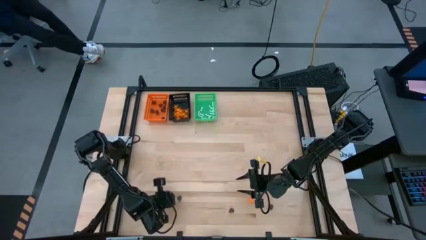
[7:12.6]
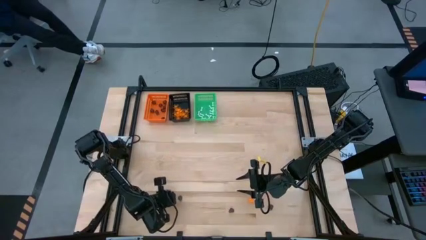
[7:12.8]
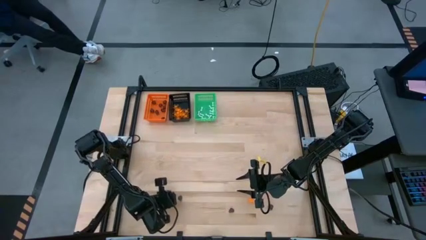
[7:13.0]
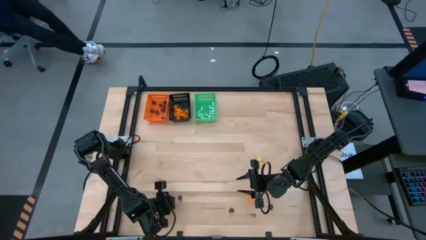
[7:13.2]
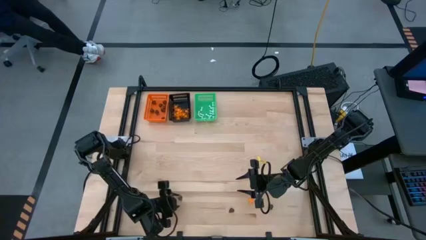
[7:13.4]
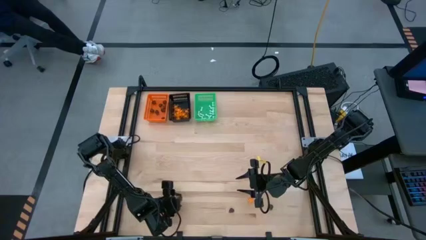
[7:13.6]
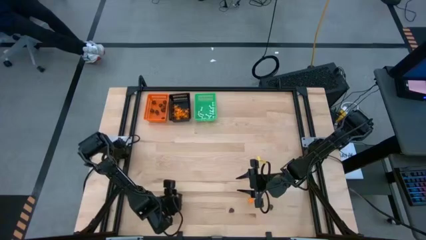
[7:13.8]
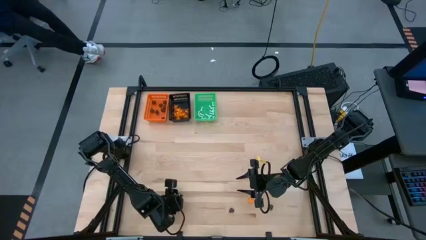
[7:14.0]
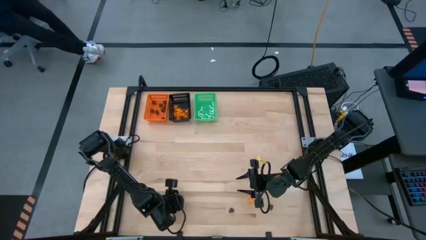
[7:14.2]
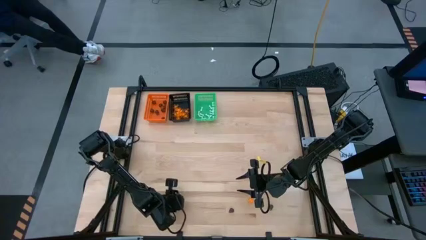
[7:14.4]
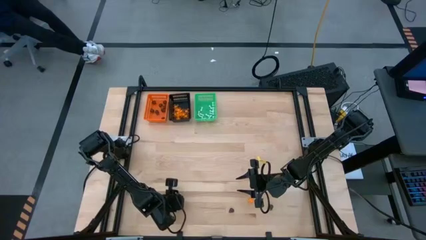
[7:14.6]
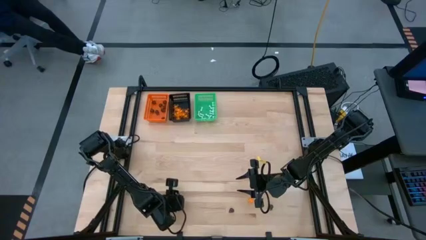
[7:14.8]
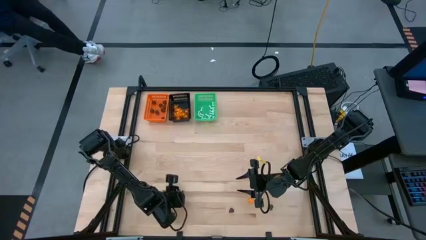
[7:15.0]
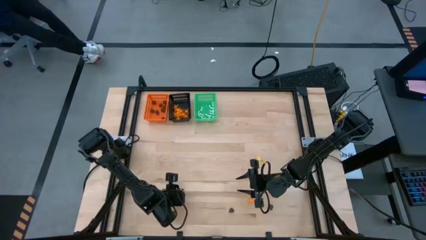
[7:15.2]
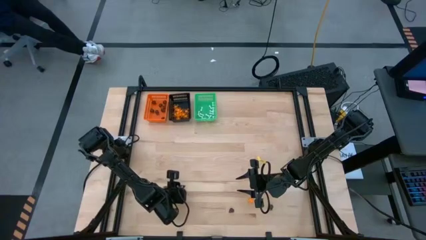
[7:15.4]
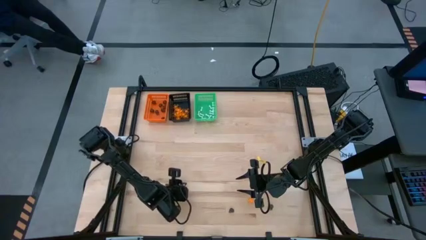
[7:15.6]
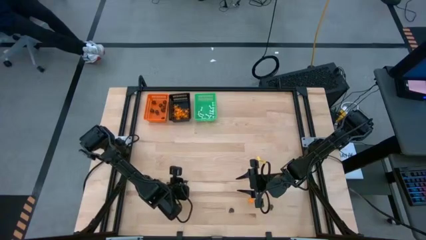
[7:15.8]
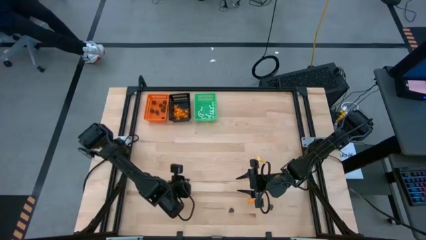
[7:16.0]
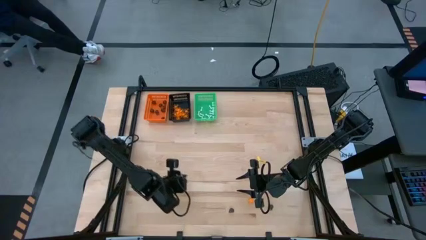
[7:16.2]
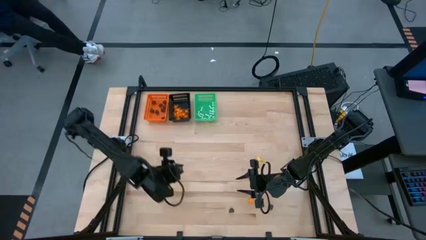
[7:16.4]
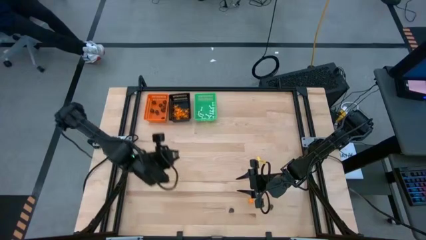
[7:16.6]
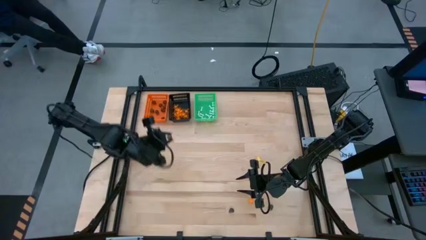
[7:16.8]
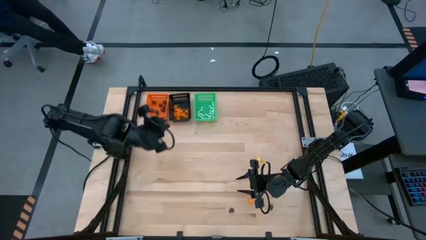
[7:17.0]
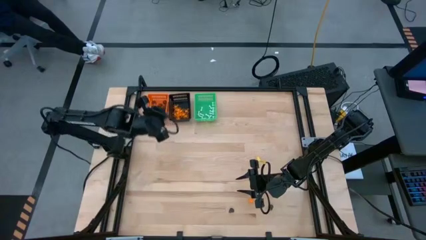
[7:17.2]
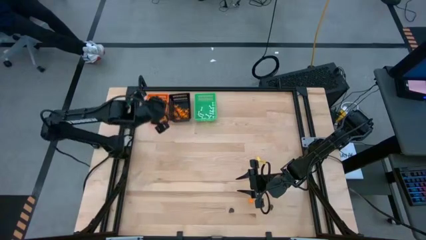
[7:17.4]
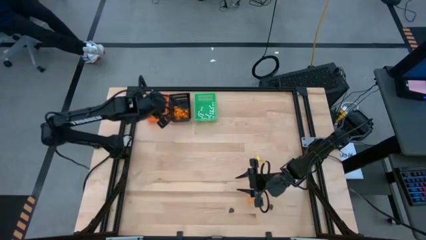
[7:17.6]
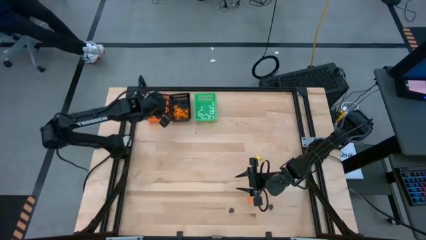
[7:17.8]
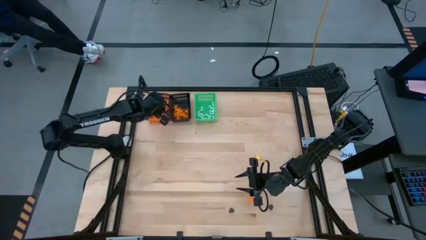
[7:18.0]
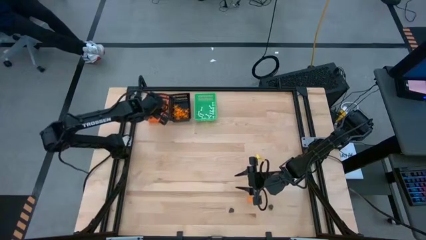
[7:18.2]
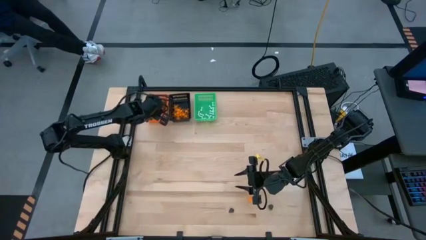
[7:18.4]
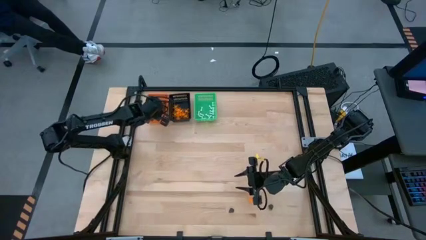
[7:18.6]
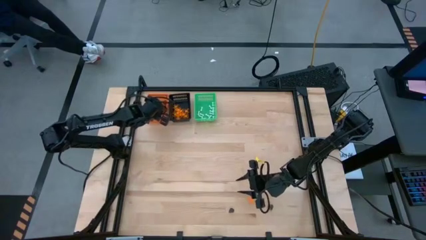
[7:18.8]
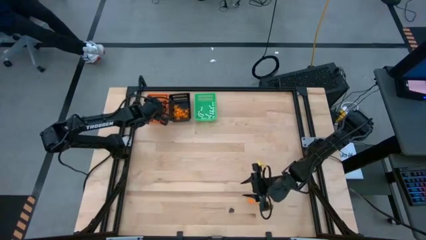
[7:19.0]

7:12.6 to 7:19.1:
Task: Sort Halloween decoration
Put the black skull toy into the orange bin

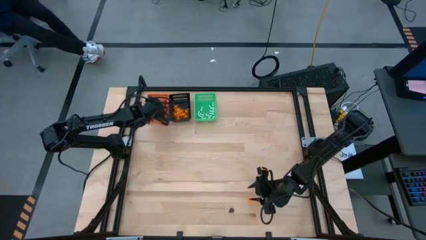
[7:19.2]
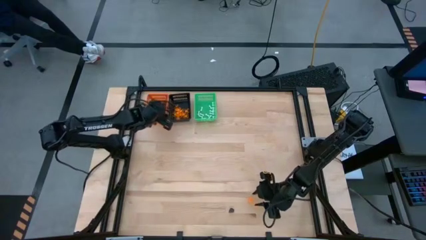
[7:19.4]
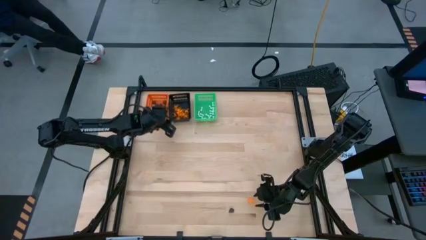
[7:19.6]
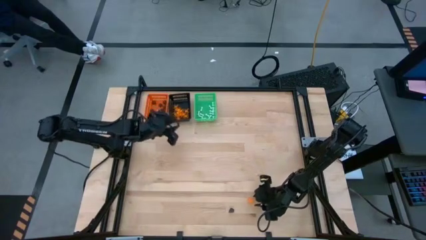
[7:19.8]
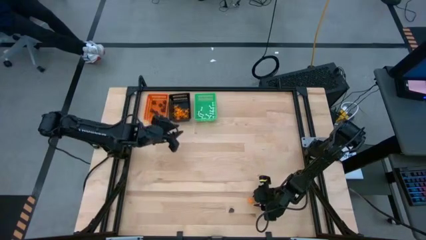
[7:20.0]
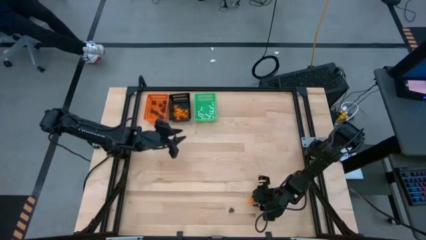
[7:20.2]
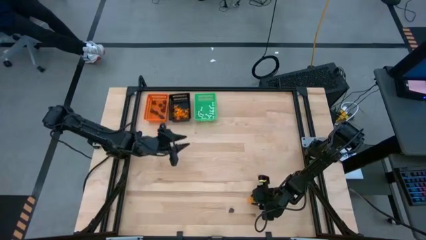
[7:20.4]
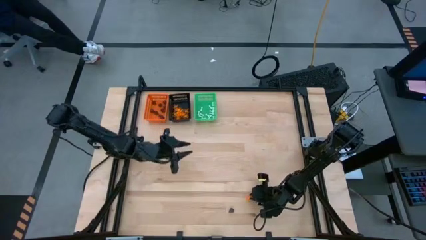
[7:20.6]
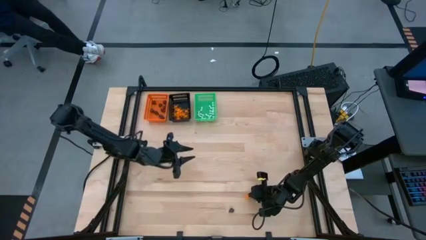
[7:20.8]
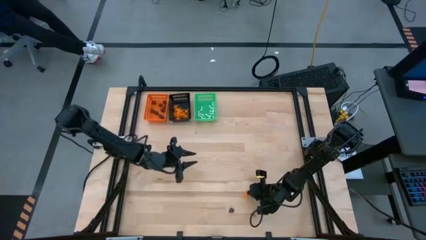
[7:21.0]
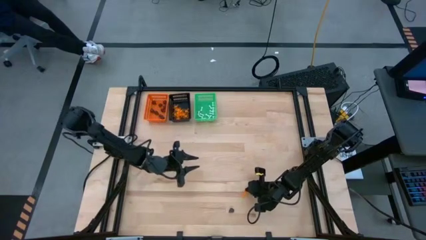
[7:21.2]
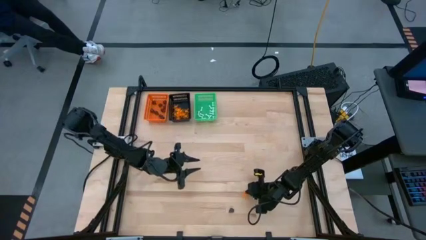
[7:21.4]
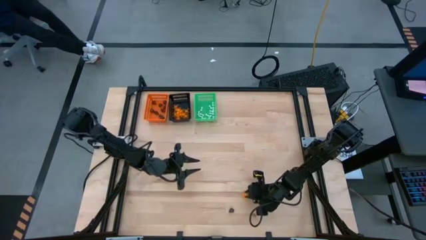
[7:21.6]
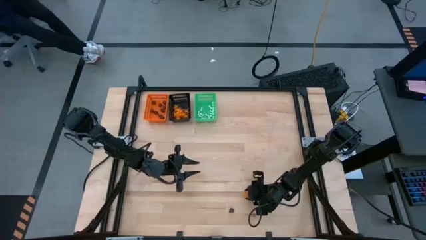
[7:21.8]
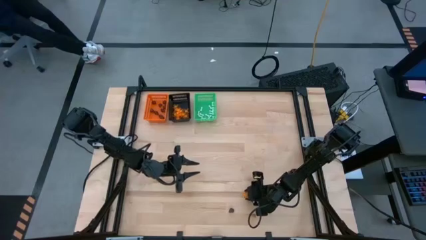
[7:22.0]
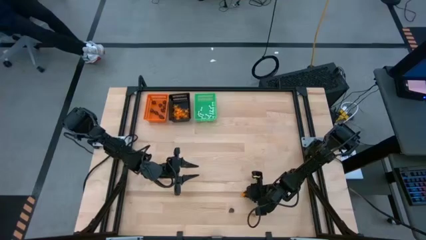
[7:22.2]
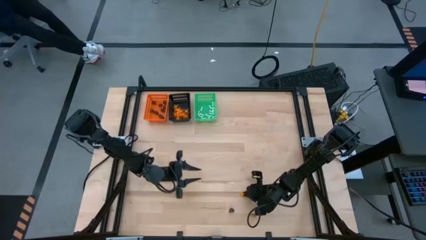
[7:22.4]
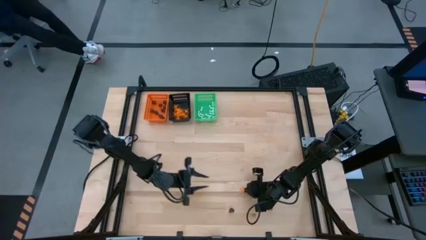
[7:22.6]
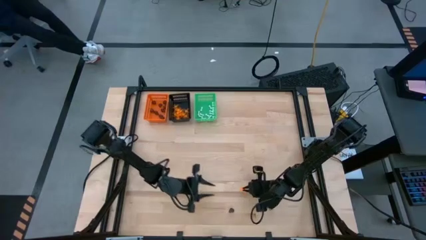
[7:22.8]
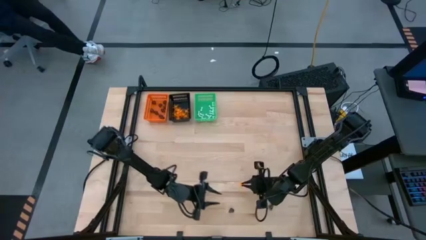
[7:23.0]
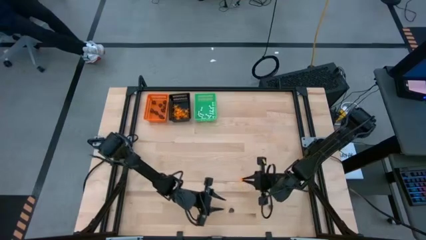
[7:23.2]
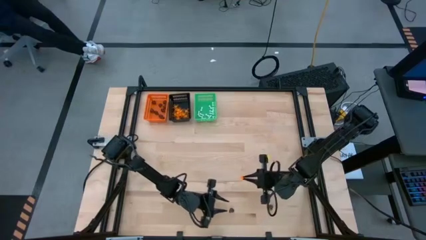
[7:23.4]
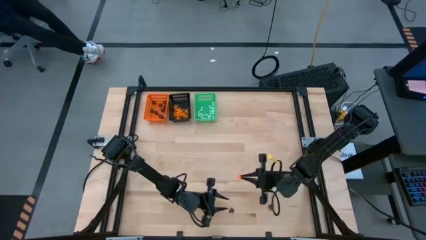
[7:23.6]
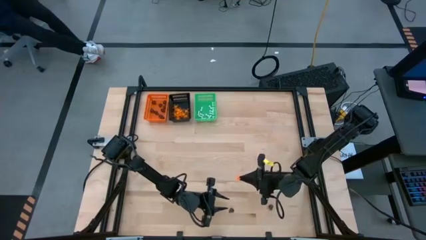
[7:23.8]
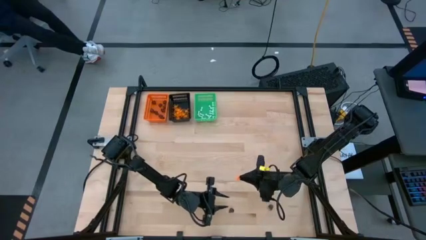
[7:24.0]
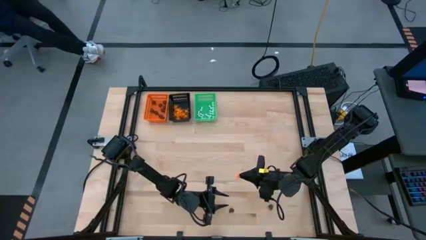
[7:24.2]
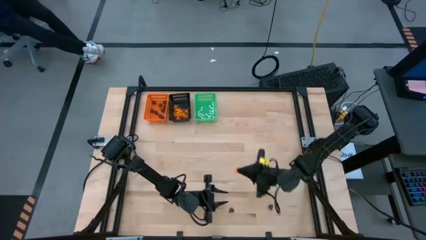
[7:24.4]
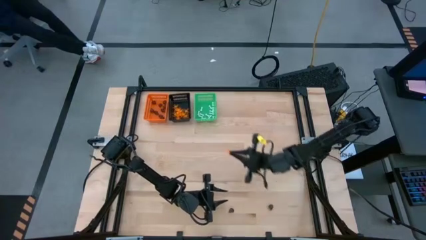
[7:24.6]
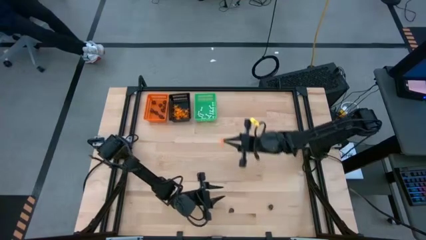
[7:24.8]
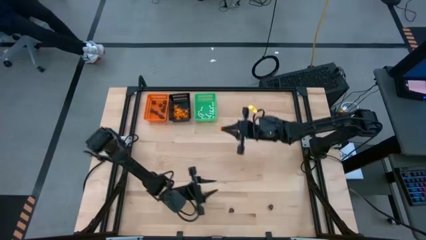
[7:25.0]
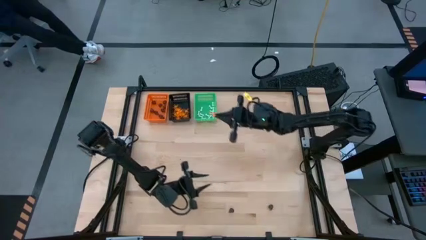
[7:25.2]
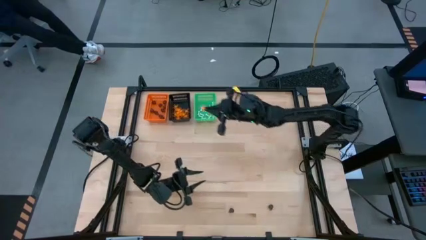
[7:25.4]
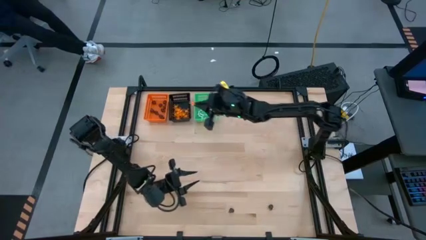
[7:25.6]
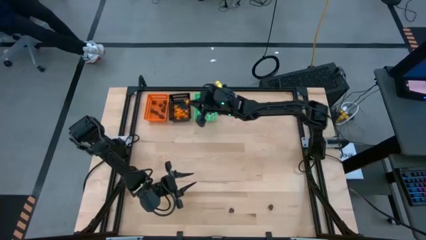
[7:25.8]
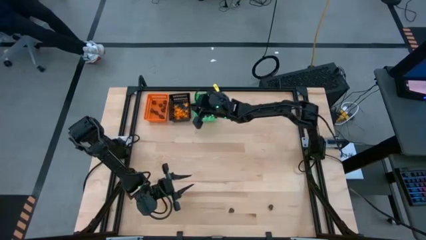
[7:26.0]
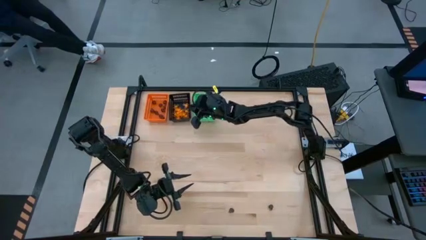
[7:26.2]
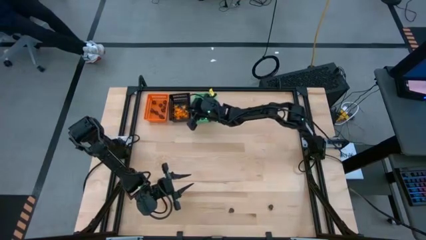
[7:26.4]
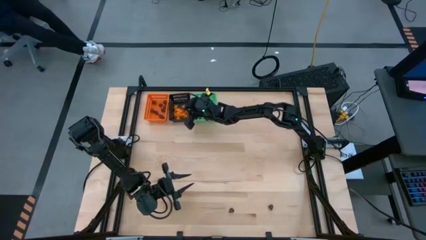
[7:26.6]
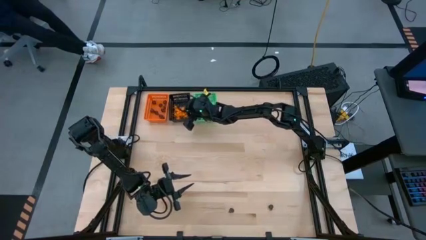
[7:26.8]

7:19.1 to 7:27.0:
Put the black skull toy into the orange bin
